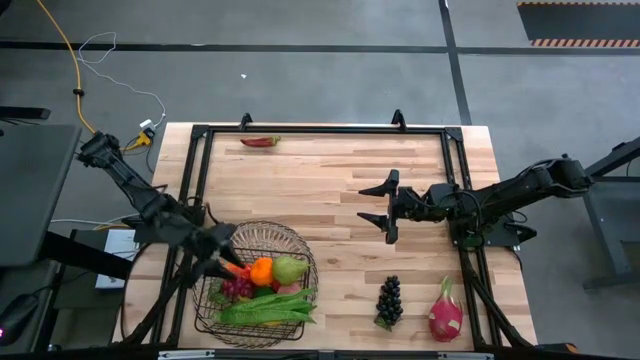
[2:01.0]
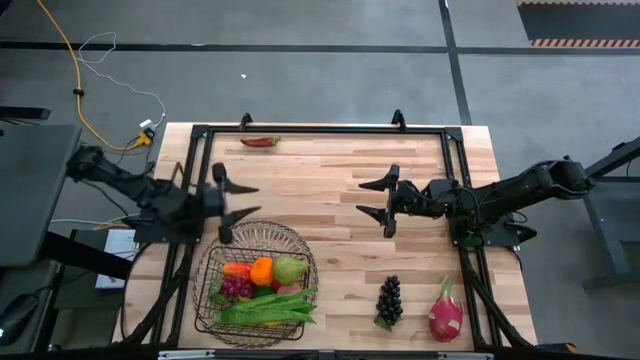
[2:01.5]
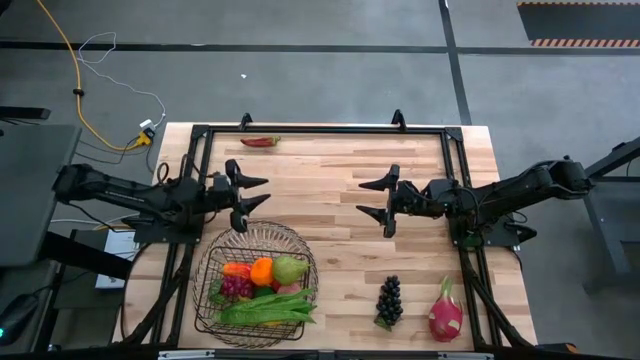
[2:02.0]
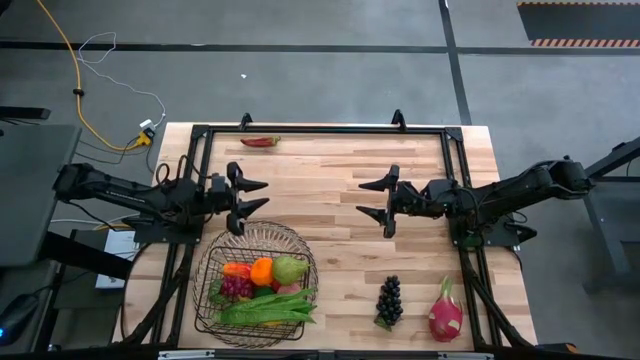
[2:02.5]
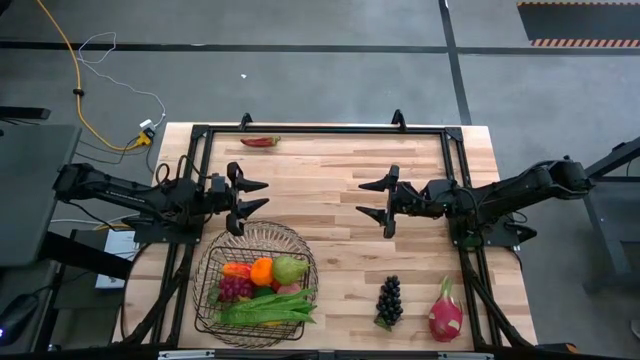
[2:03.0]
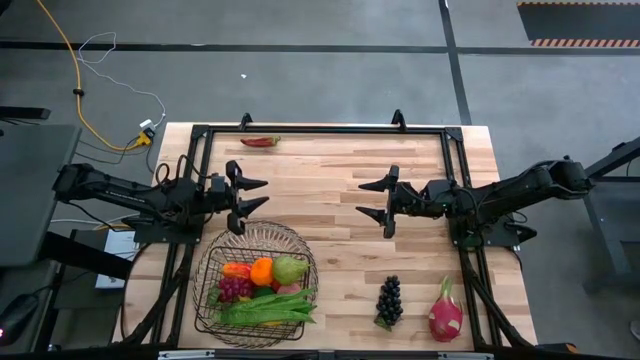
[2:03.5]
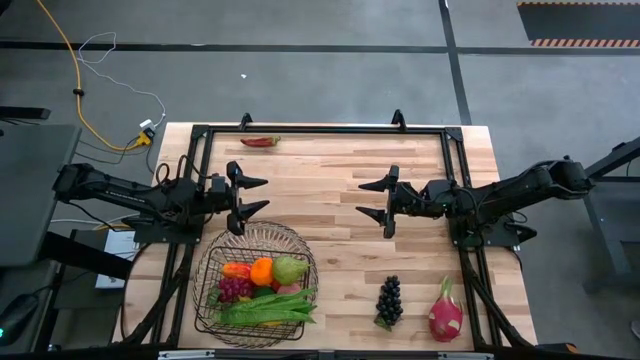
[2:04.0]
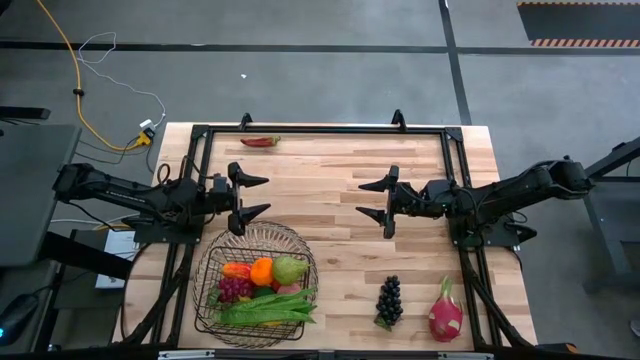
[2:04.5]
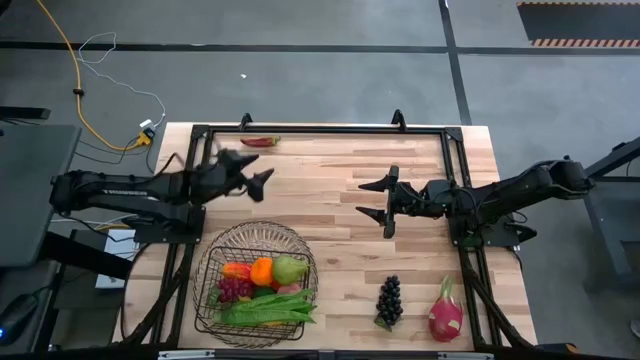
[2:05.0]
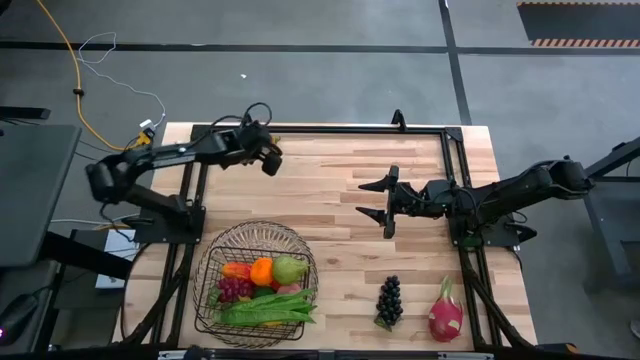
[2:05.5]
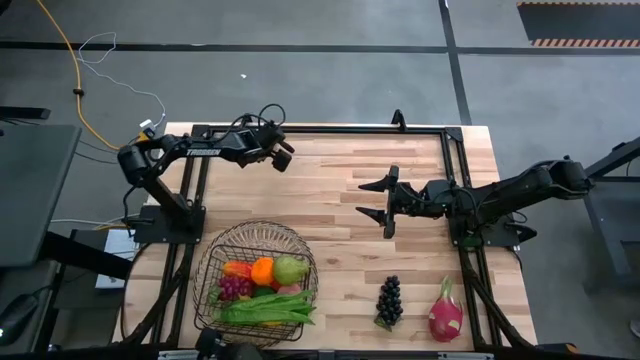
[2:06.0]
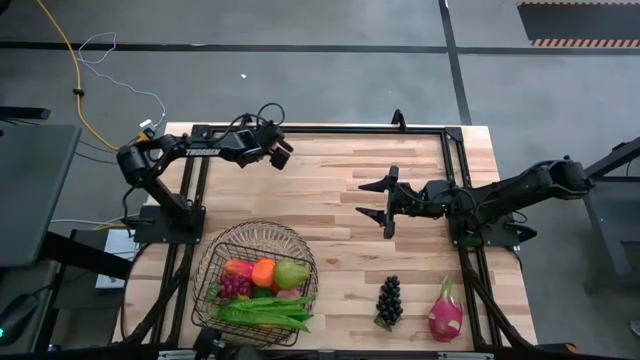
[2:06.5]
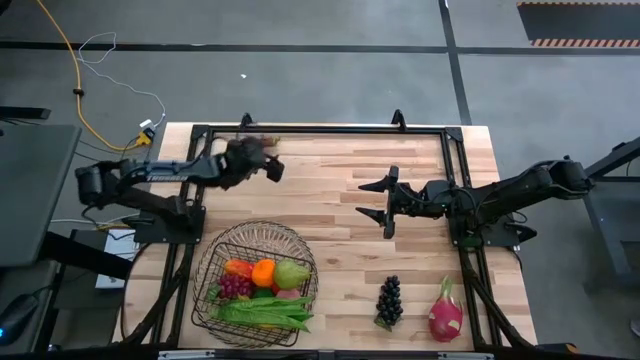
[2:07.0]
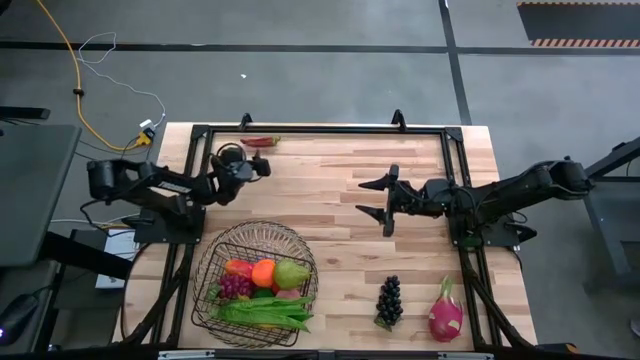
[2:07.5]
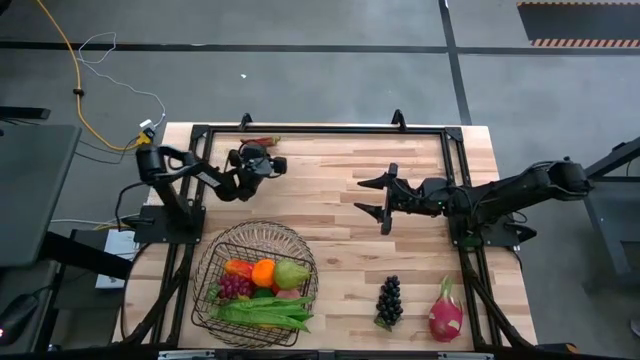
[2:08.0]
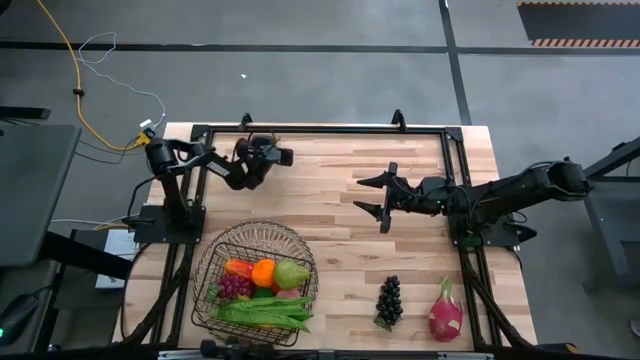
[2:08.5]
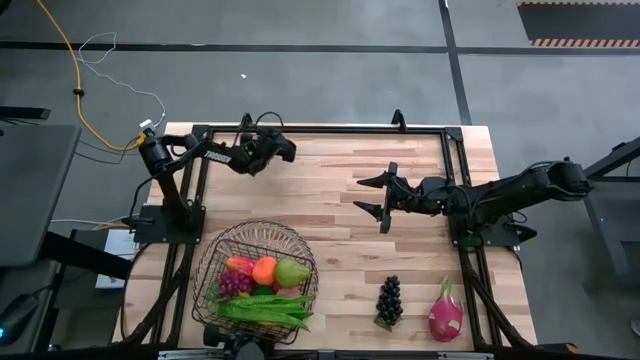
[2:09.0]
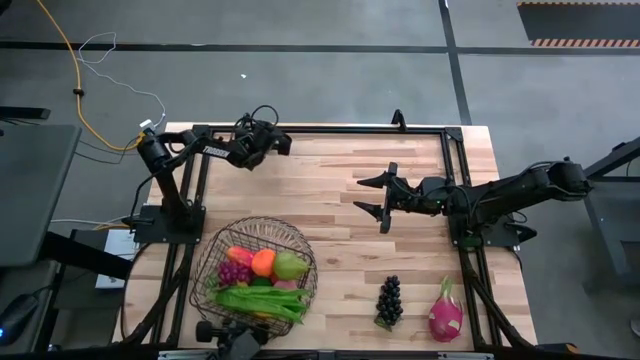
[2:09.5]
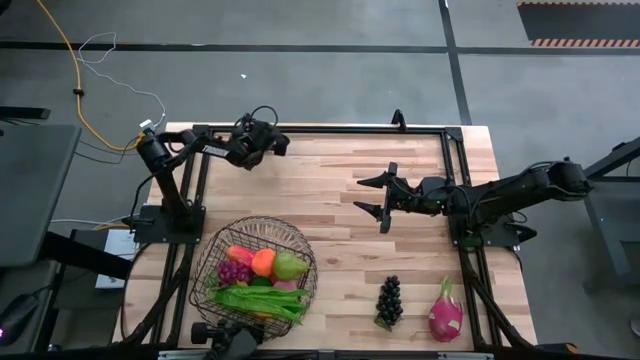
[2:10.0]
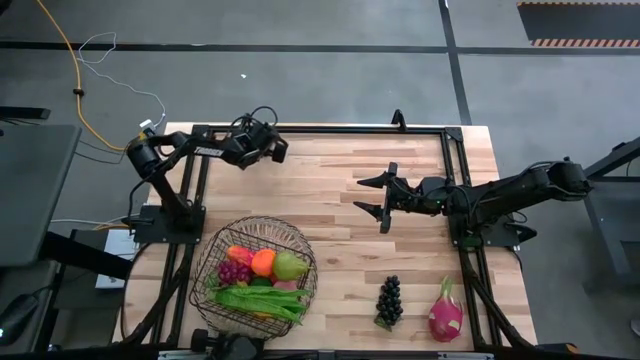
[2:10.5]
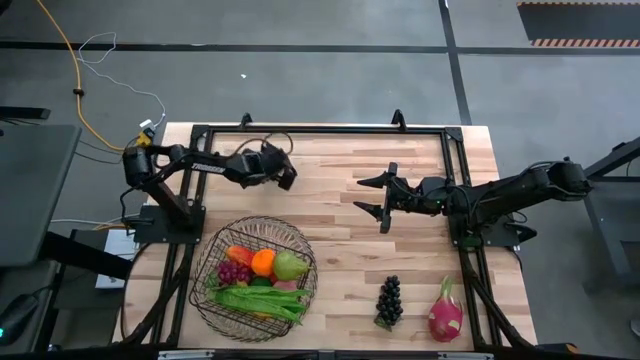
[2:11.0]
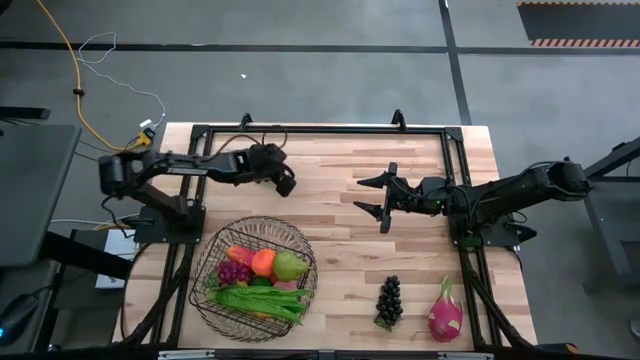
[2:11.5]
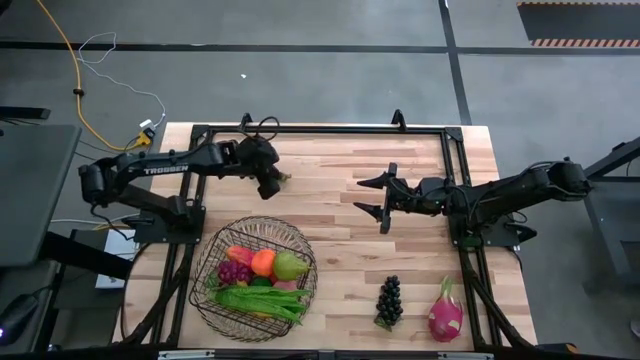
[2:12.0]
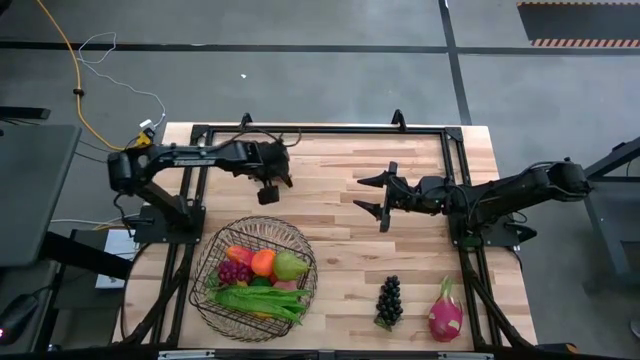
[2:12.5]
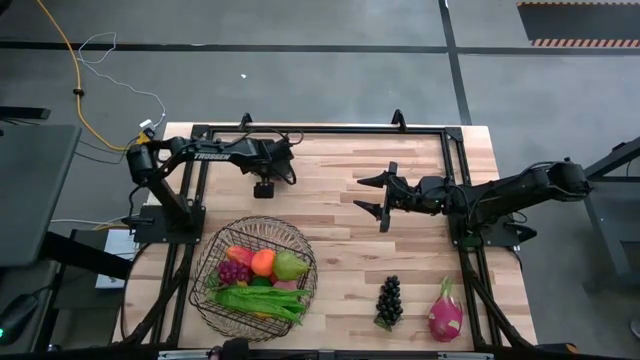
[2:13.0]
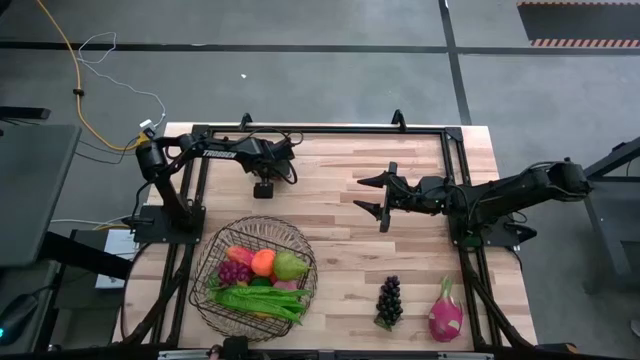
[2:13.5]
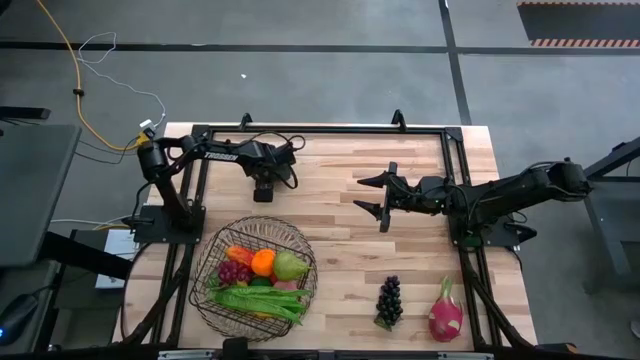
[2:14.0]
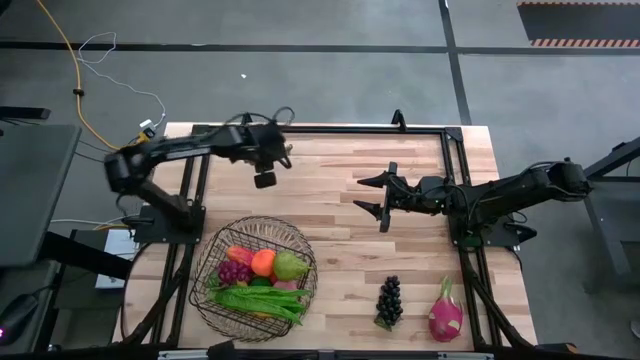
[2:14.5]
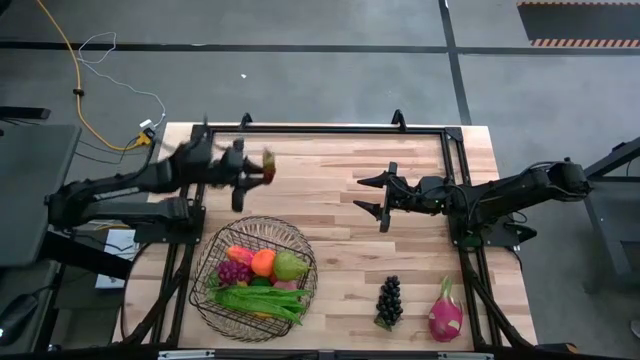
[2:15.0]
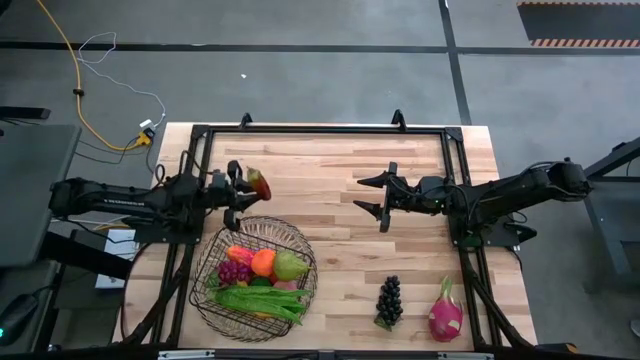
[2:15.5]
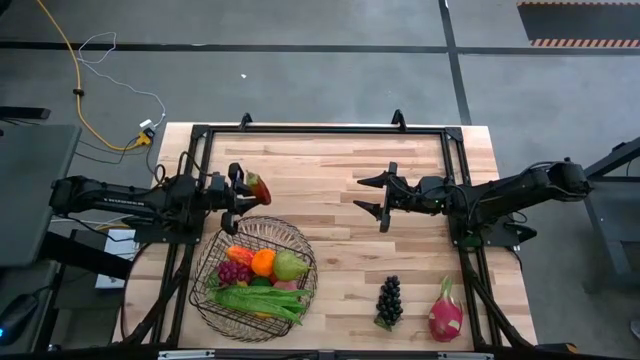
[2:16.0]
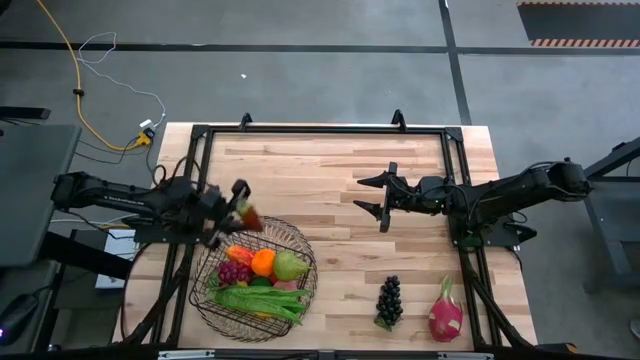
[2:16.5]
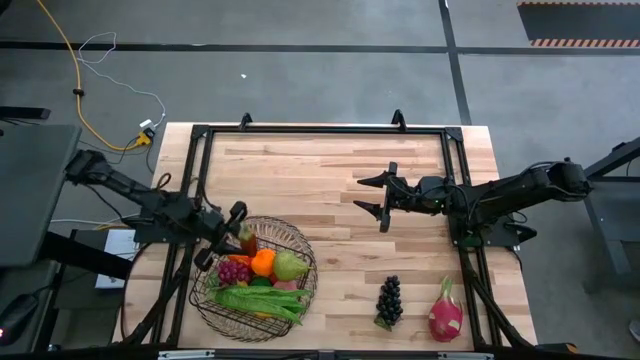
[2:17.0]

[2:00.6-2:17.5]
Task: Build produce basket
Put the red chili pepper into the black wire basket

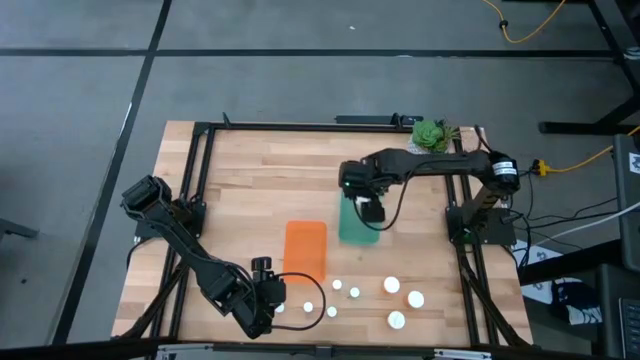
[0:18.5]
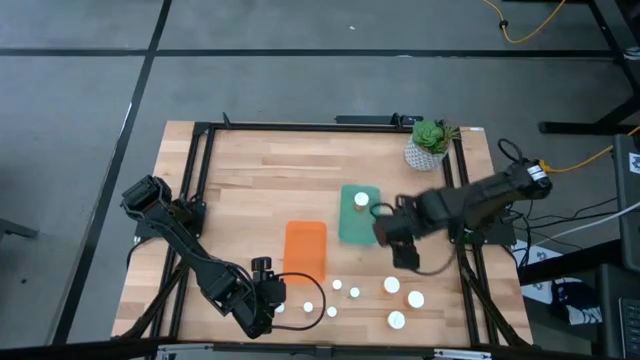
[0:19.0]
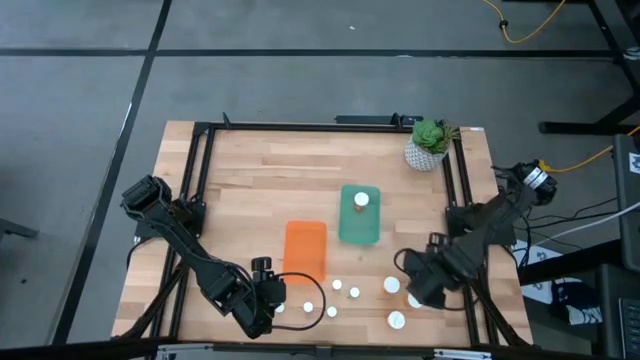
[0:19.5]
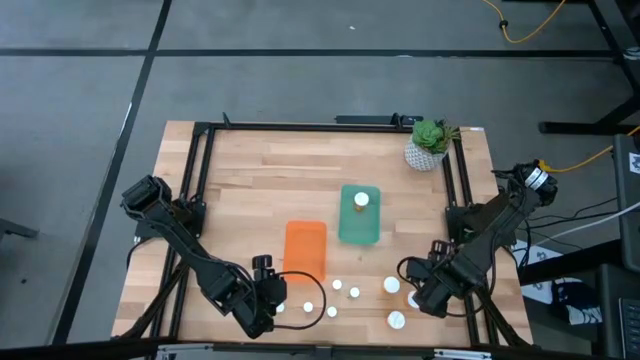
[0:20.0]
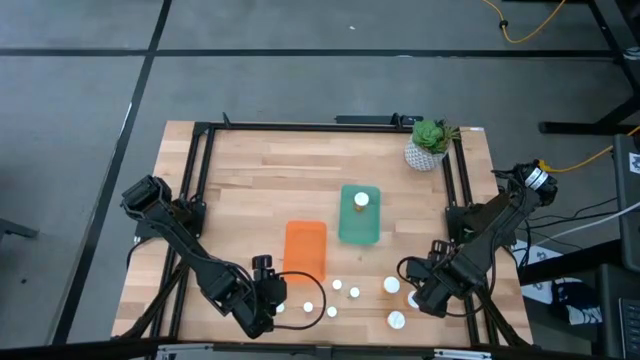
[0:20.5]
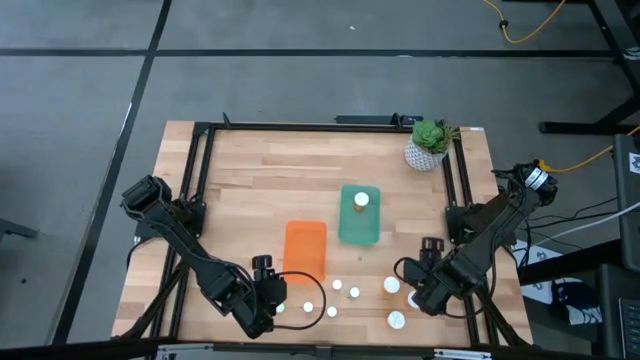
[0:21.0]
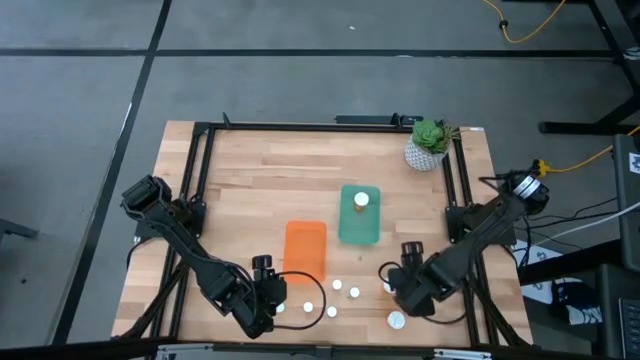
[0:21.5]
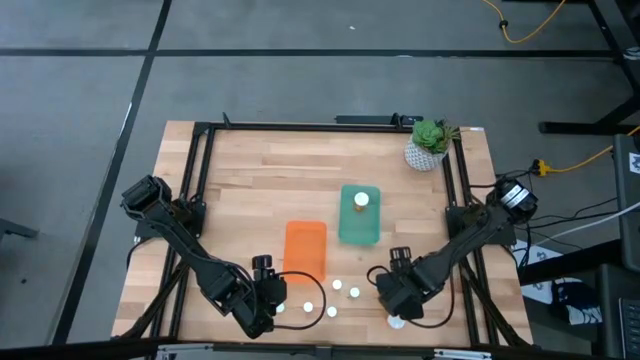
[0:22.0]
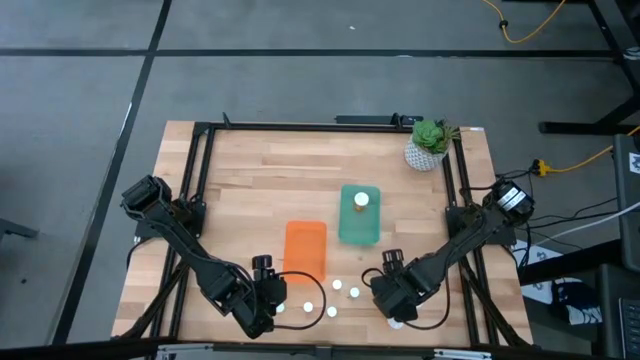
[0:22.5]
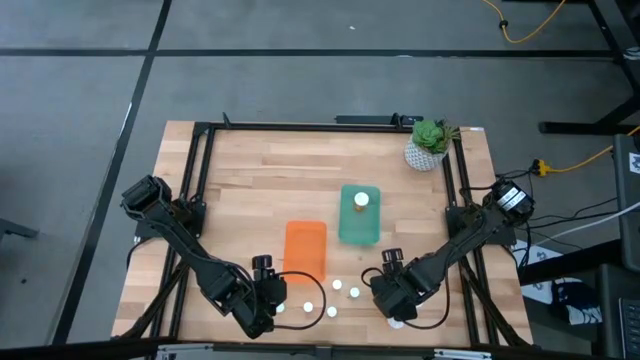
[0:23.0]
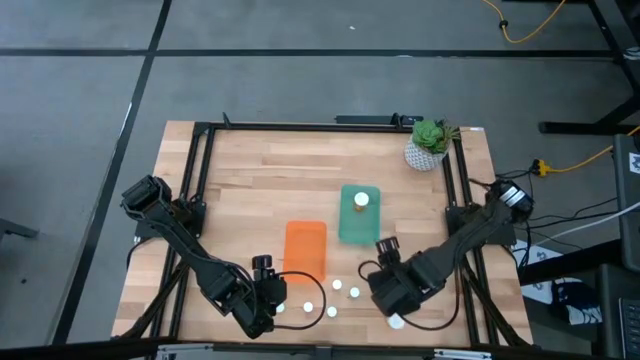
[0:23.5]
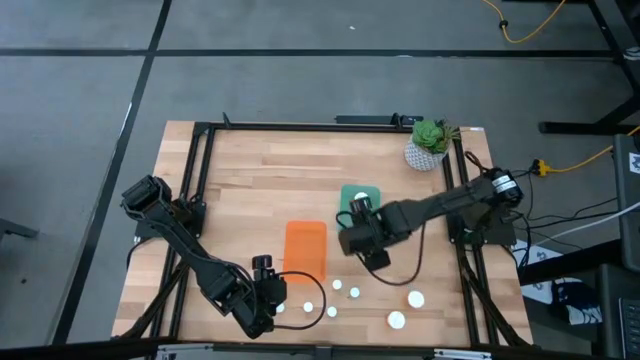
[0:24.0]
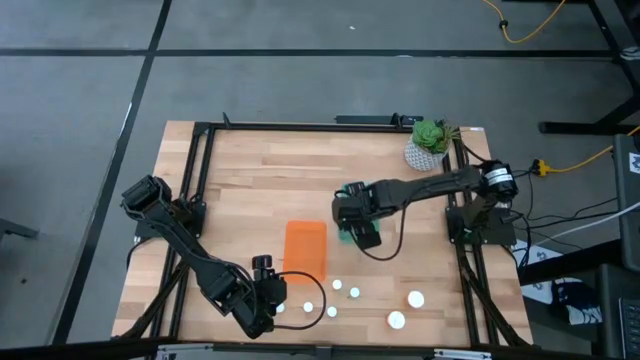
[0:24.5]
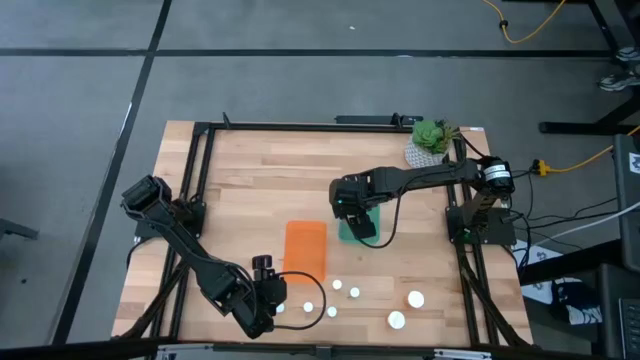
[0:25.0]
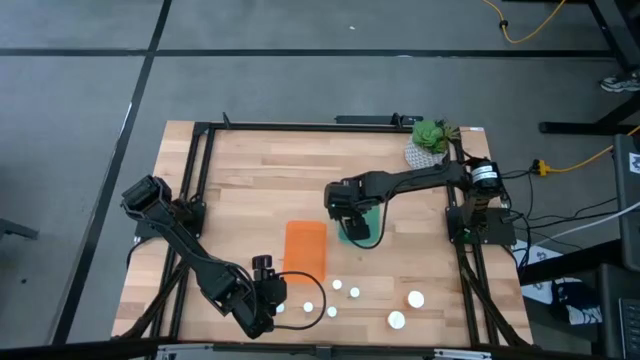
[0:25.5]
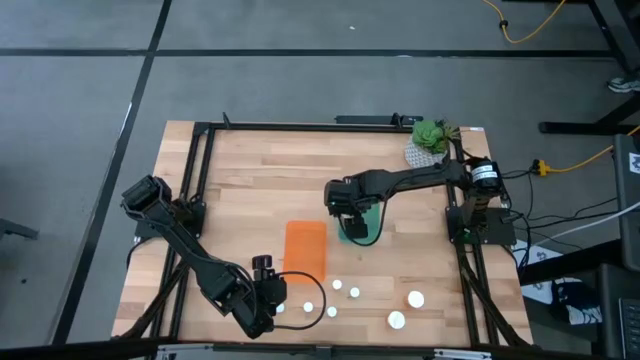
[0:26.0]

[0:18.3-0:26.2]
Task: Pick and place medicine bottles into bin by pill shape (circle, oval)
Put the big orange capsule bottle into the green bin
